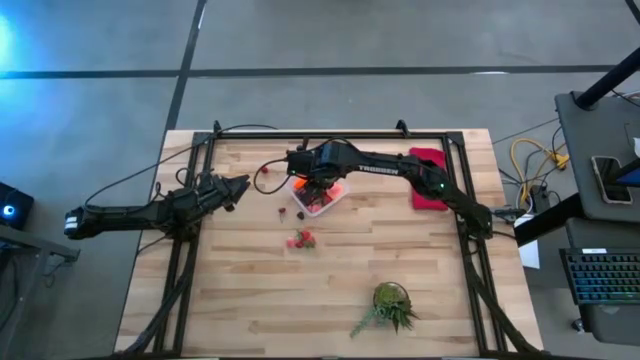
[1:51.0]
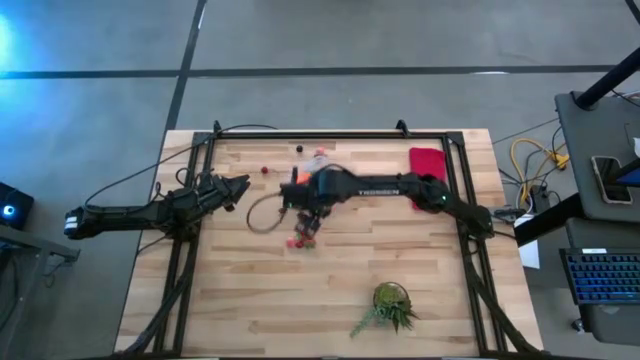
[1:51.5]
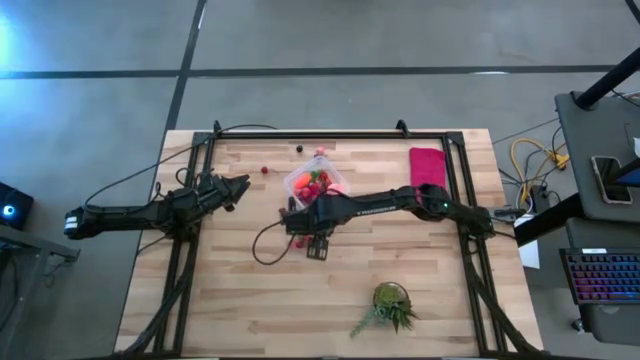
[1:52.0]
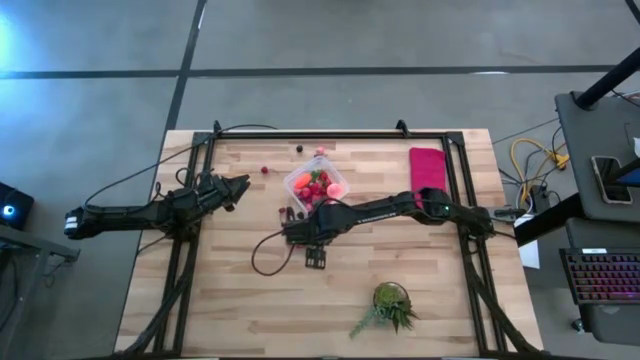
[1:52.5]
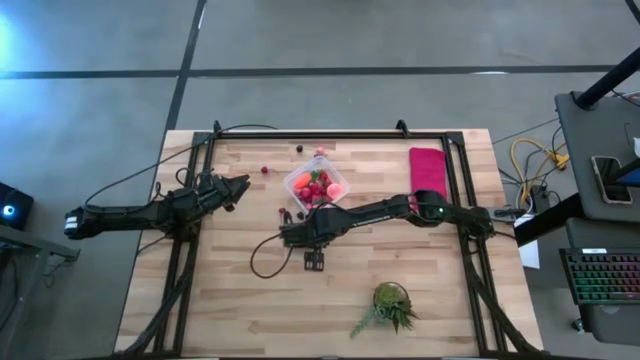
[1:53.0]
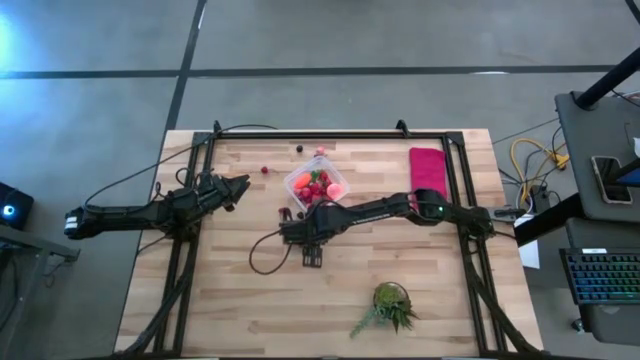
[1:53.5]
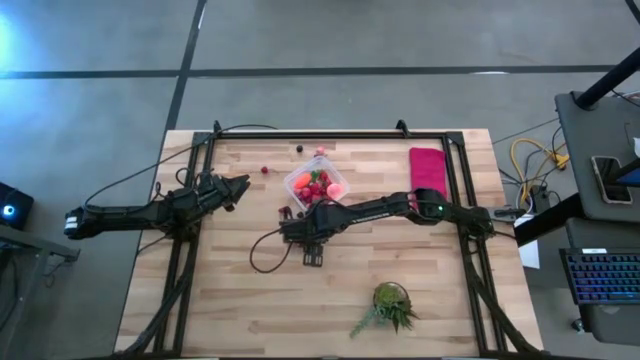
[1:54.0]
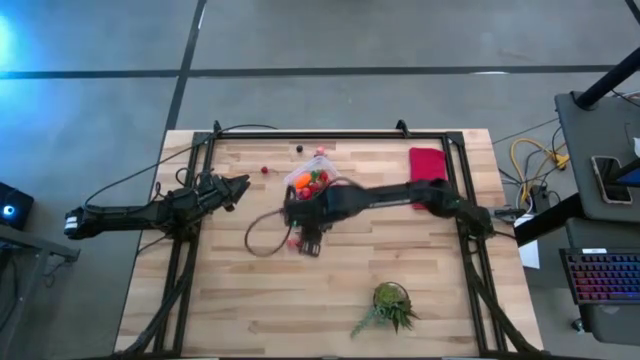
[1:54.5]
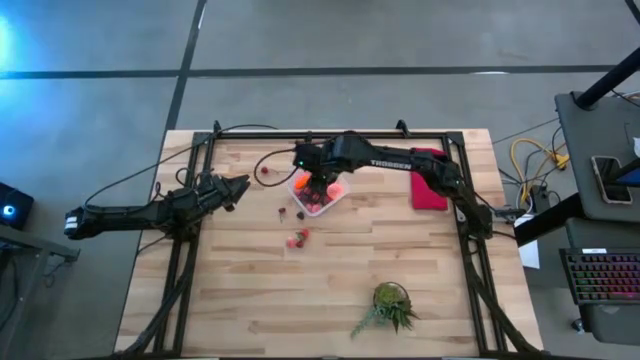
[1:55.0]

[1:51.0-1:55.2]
Task: Pick and placing Produce into tupperware
Put the red strawberry into the transparent container

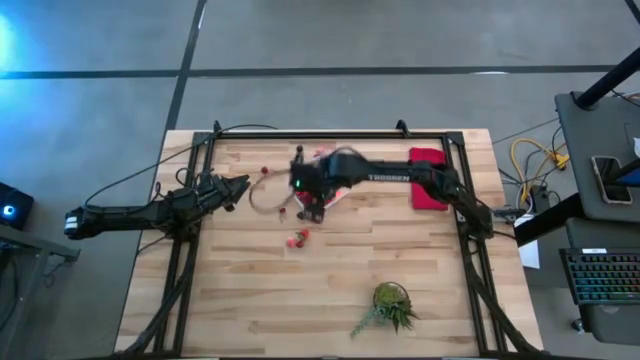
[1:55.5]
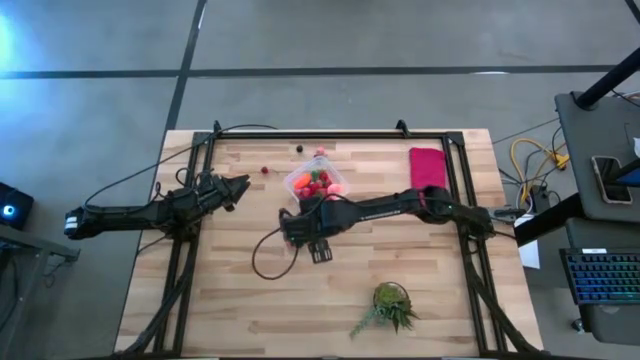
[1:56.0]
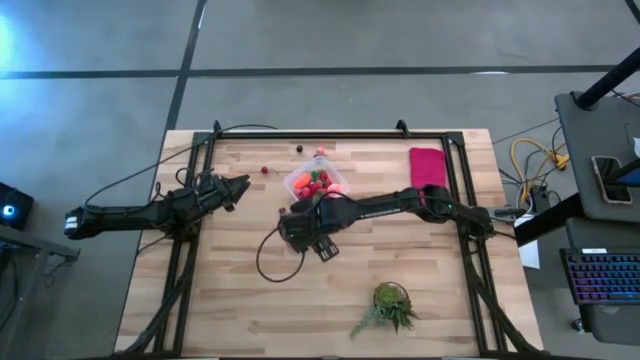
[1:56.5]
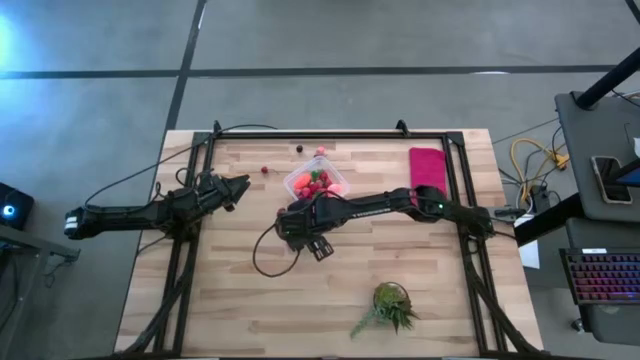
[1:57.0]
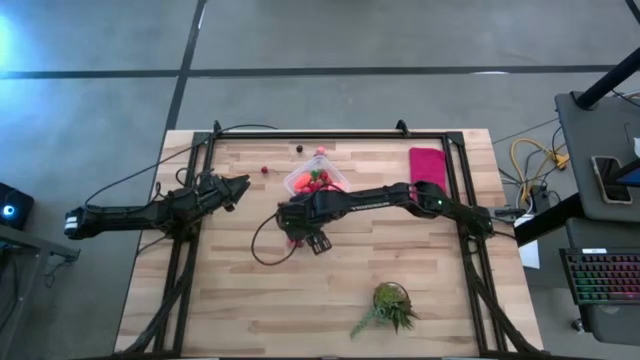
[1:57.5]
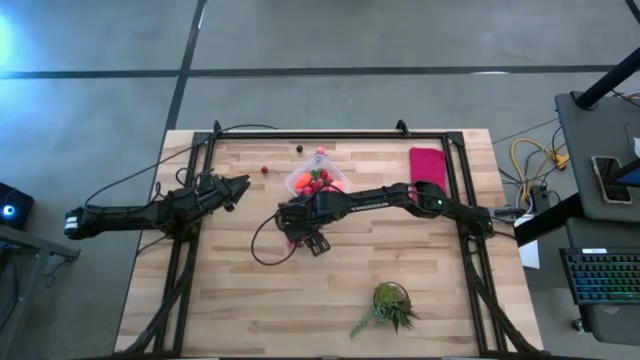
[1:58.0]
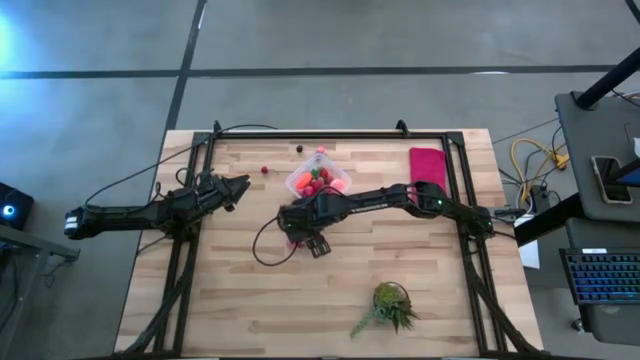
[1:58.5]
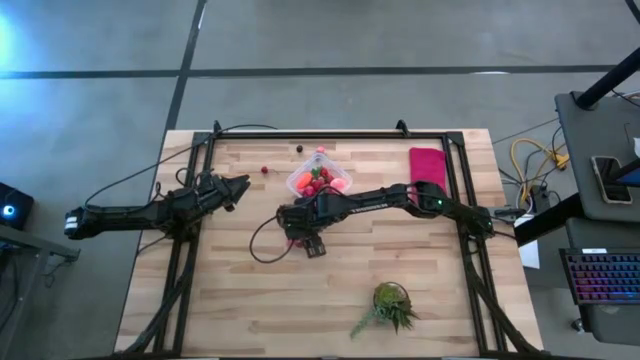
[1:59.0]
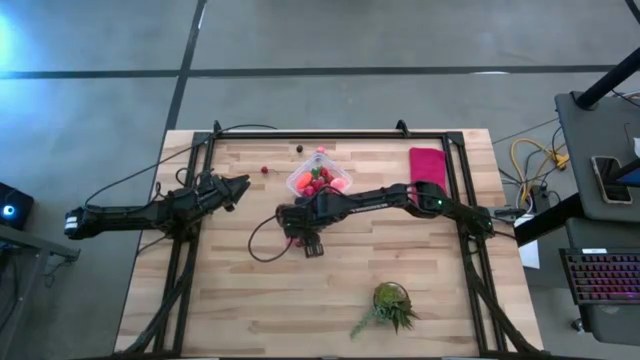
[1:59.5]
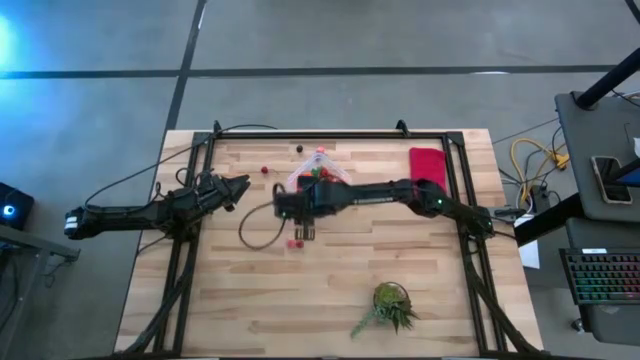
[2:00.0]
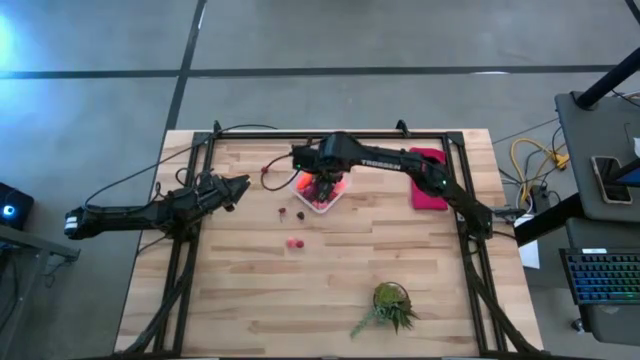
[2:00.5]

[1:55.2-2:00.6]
Put the red strawberry into the transparent container

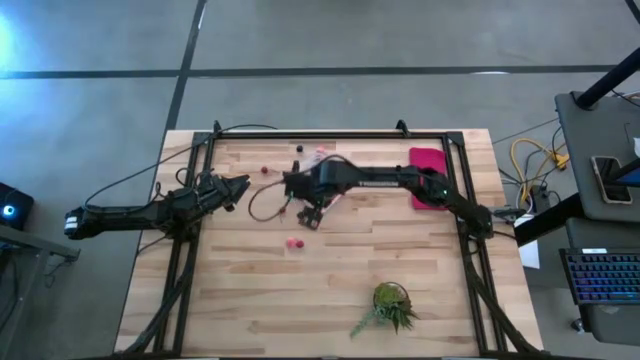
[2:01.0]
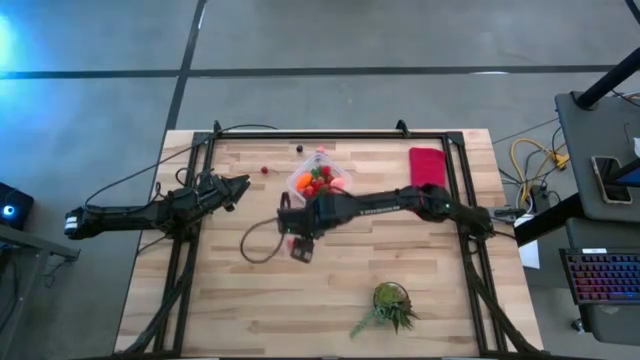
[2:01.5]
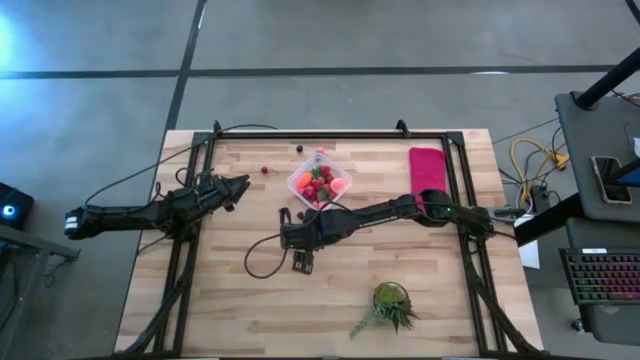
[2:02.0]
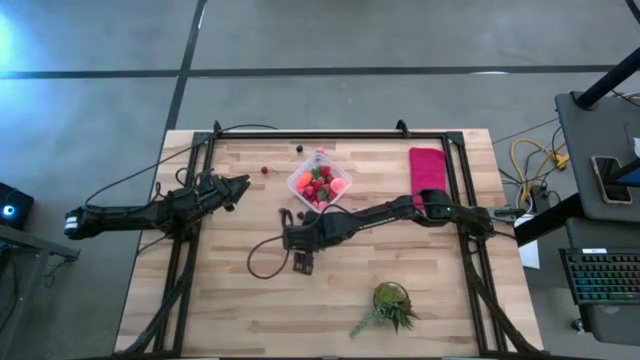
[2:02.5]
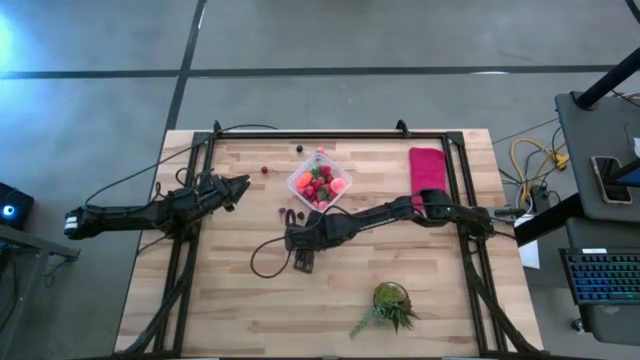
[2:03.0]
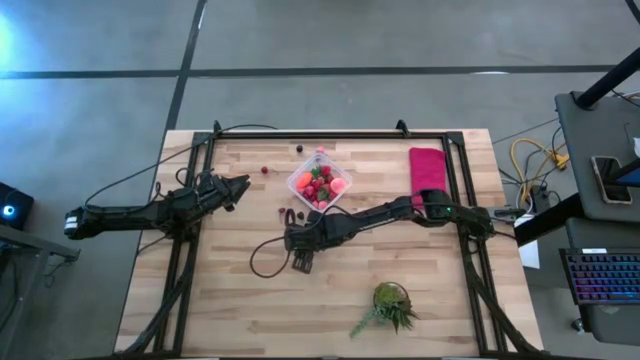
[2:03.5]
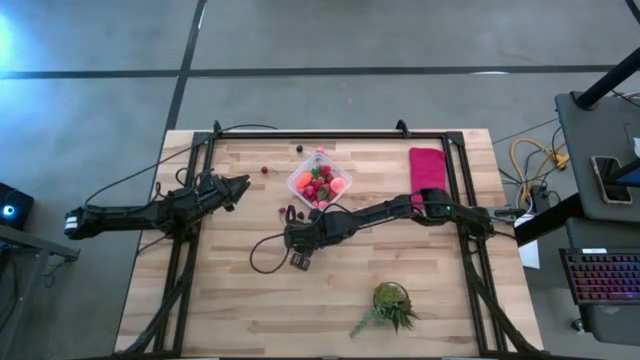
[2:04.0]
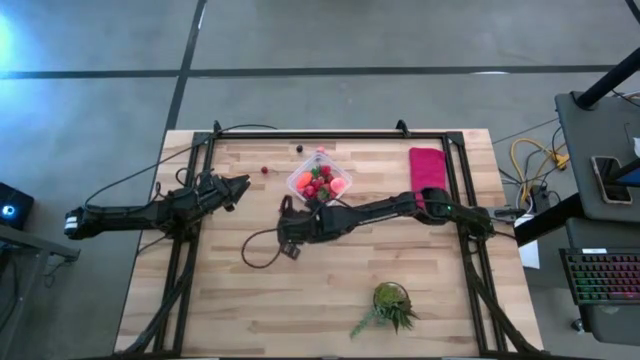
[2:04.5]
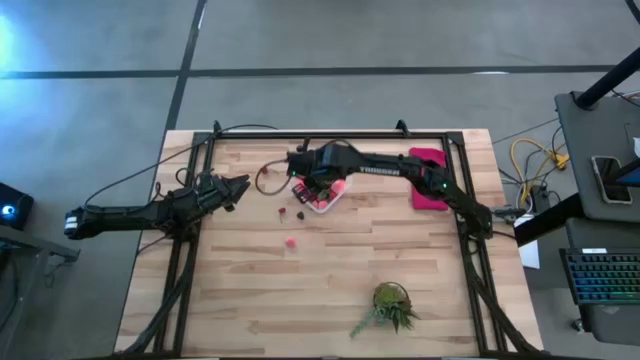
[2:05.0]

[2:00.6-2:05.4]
Put the red cherry into the transparent container

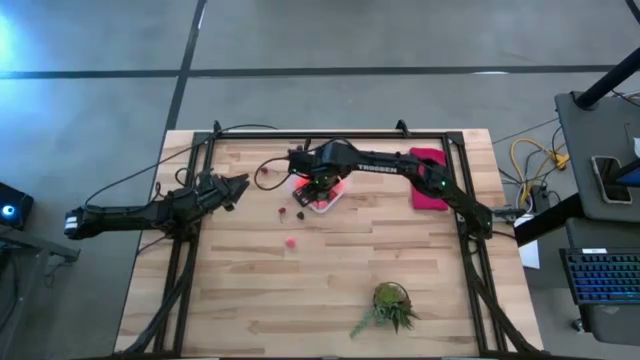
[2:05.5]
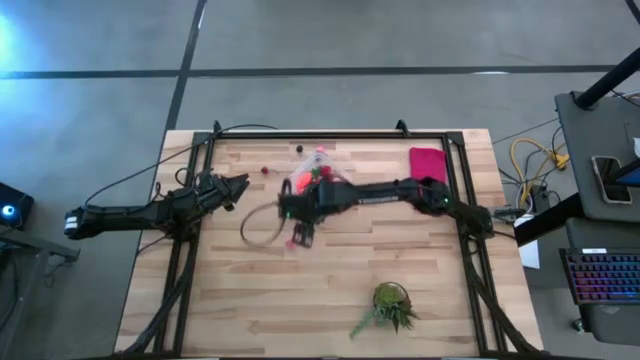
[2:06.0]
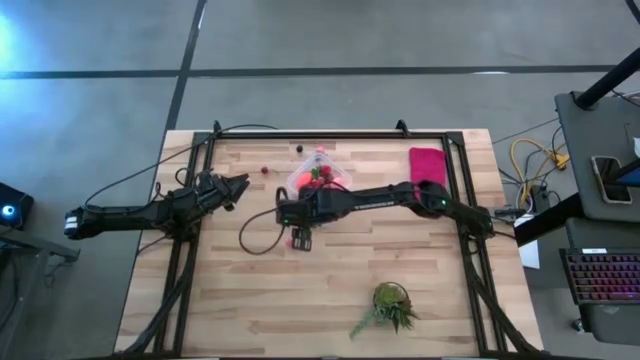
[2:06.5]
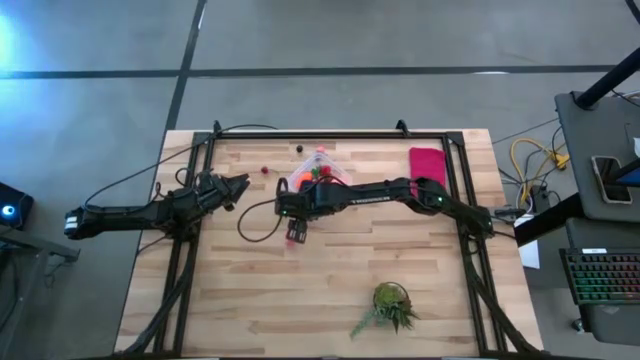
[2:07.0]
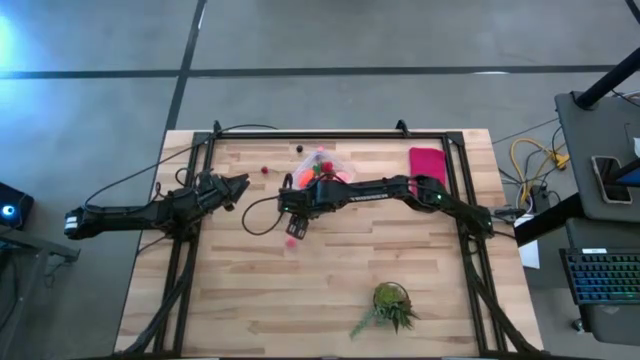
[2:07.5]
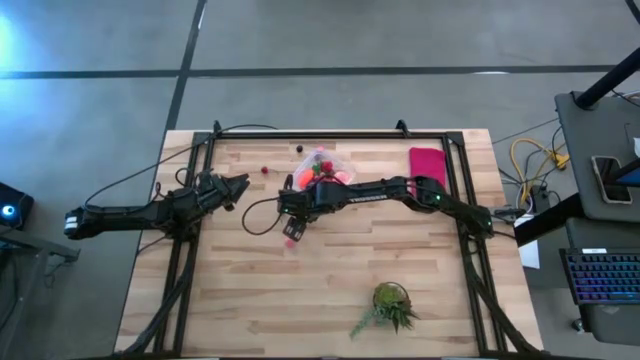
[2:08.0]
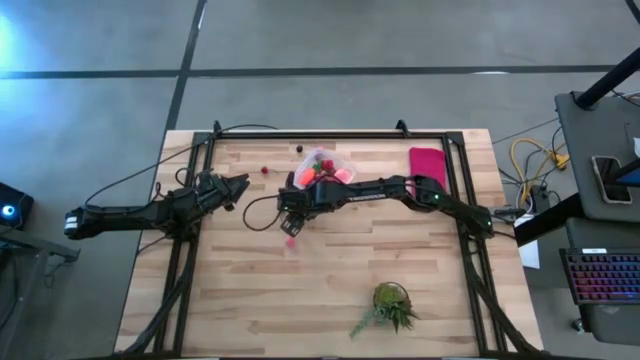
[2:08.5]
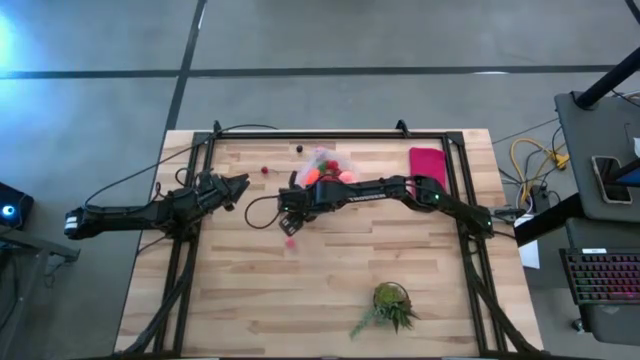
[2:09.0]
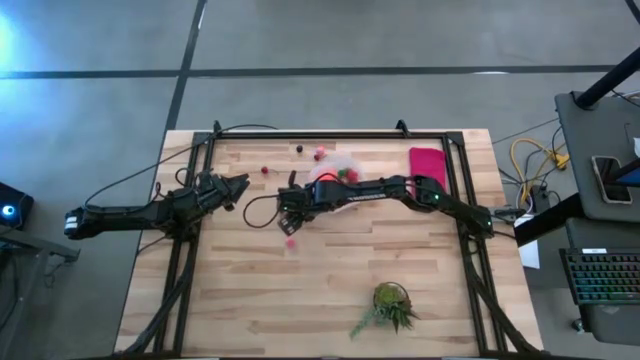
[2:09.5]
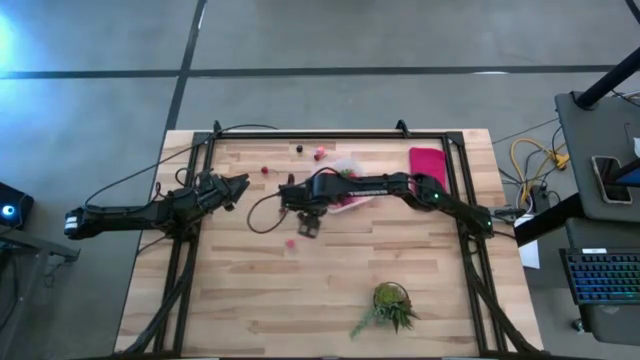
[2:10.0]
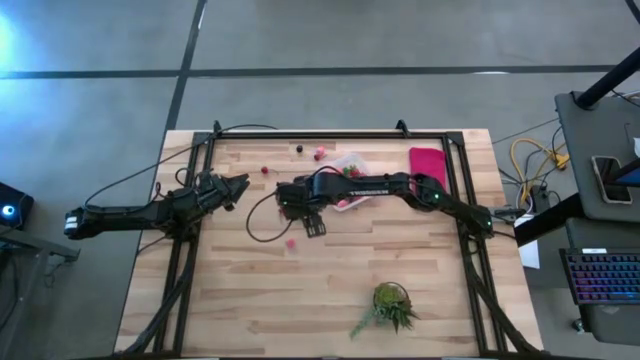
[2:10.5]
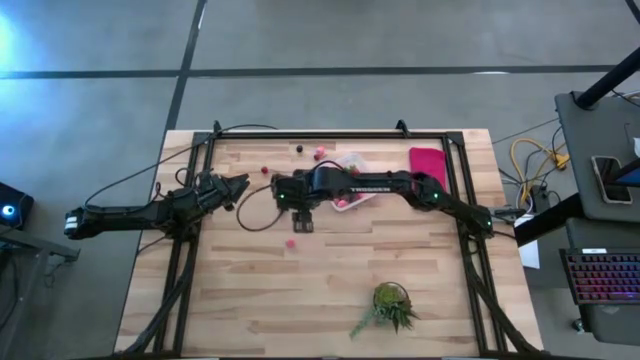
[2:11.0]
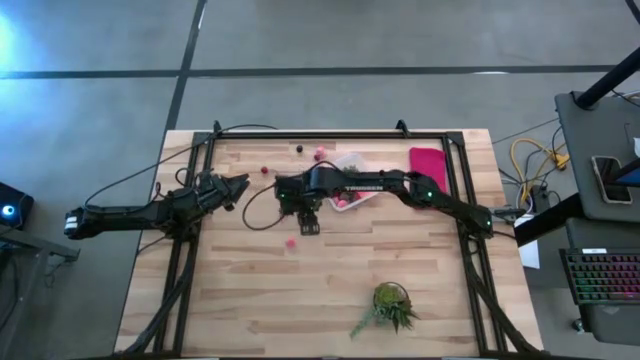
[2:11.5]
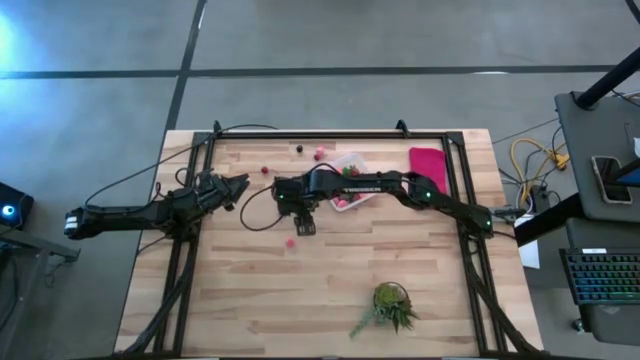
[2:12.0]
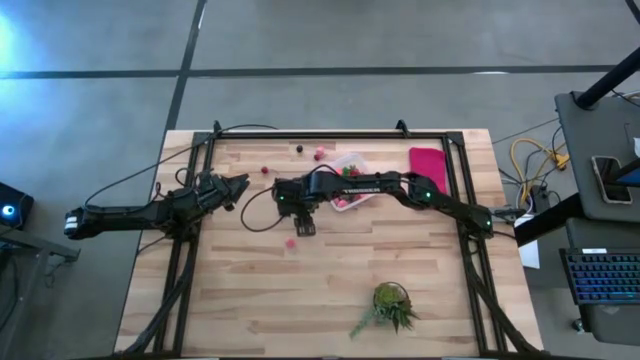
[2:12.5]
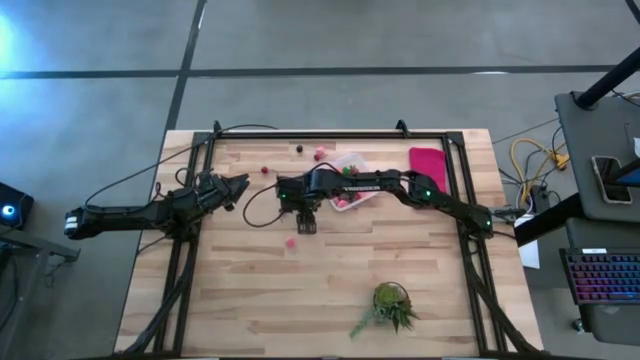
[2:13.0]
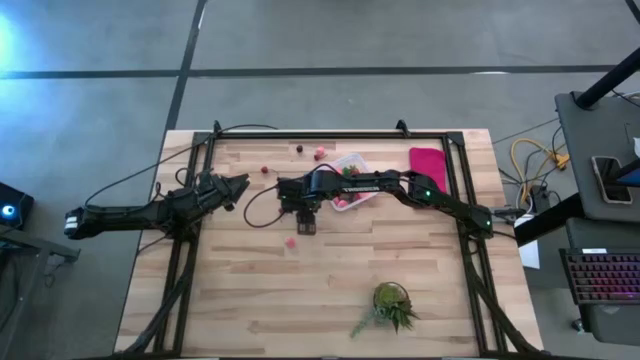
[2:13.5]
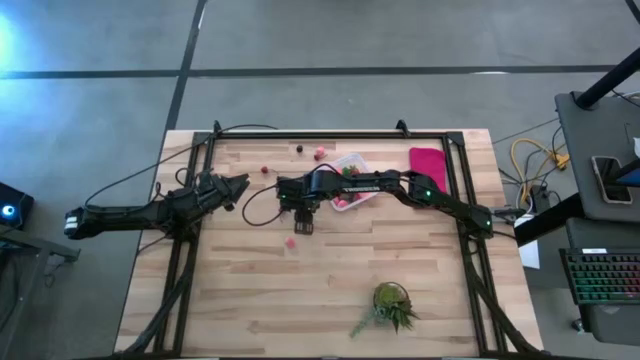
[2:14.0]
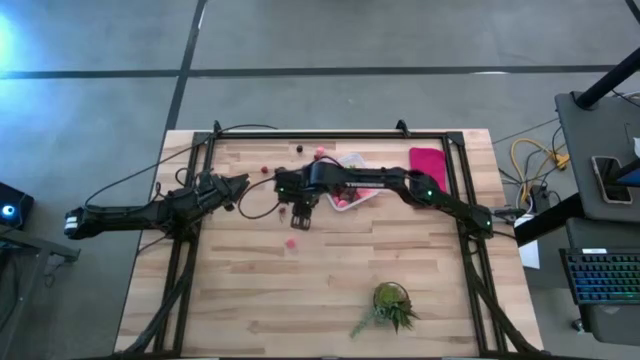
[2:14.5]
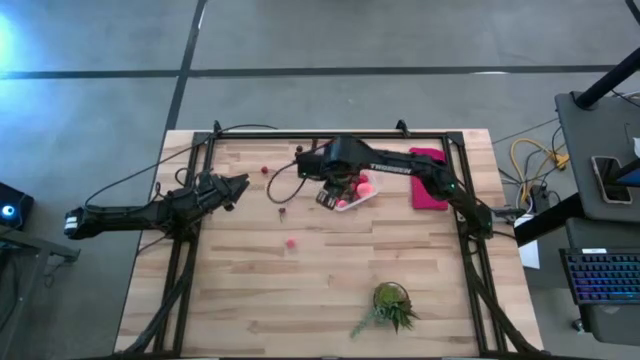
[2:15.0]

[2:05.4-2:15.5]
Put the blackberry into the transparent container
